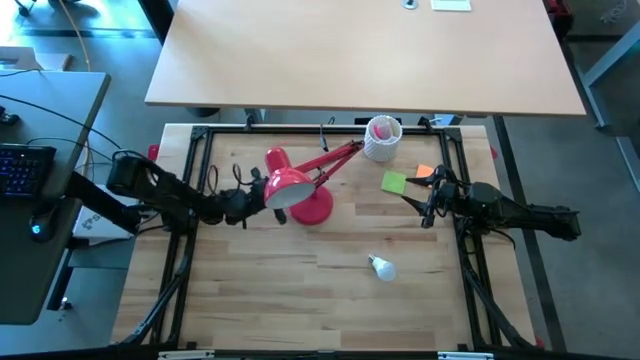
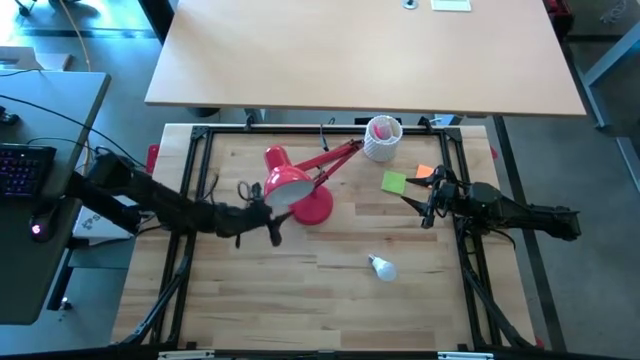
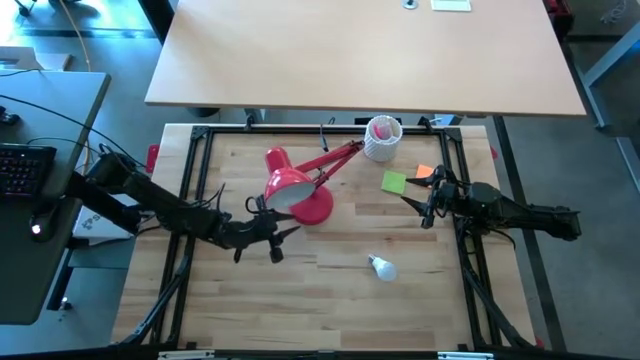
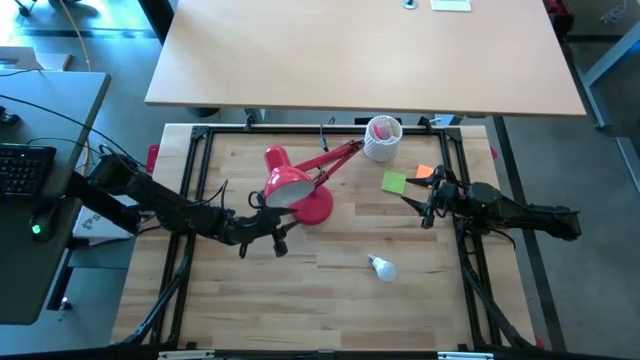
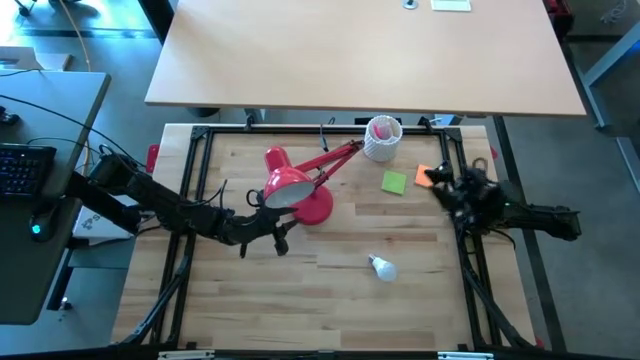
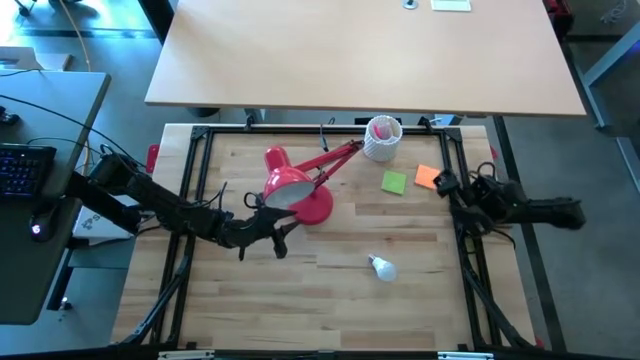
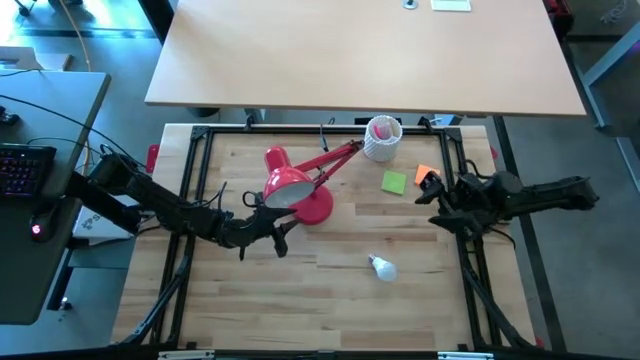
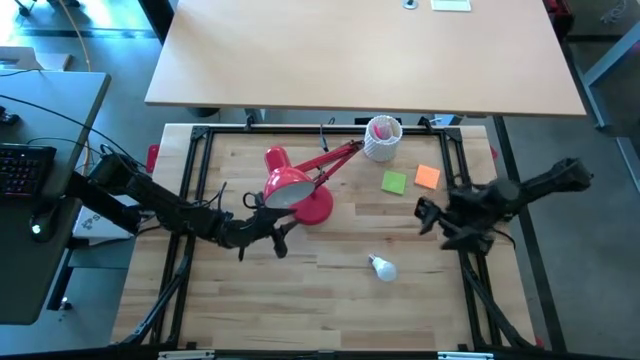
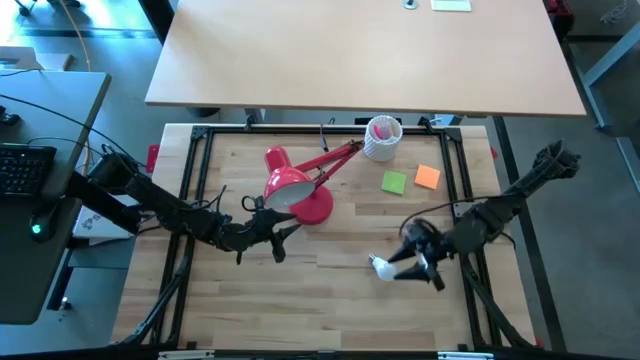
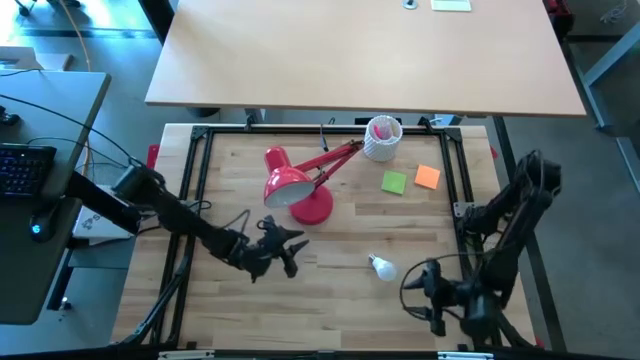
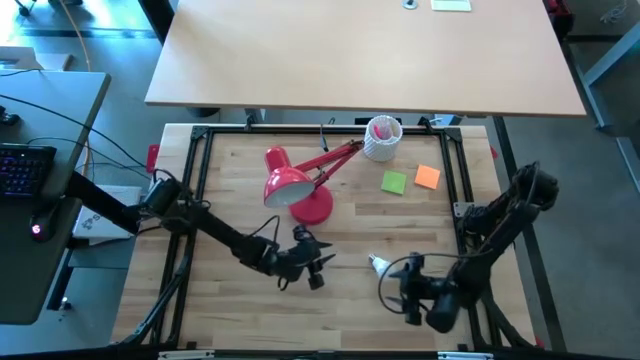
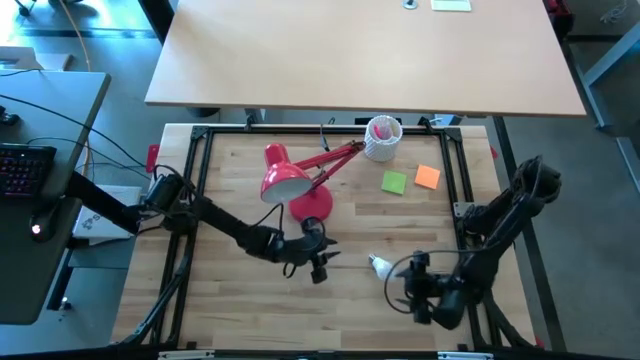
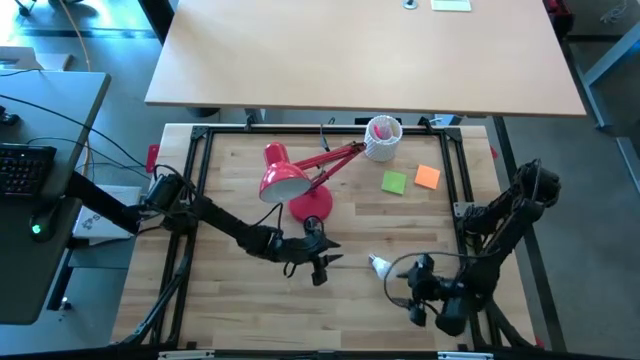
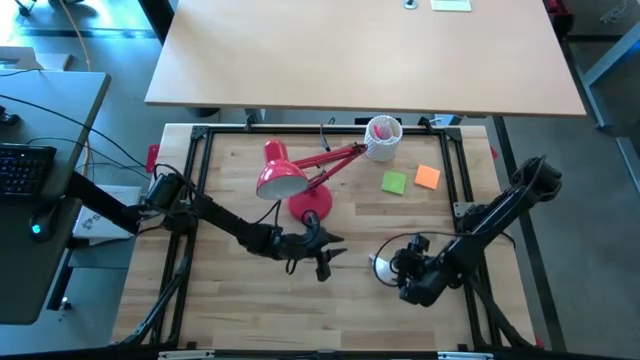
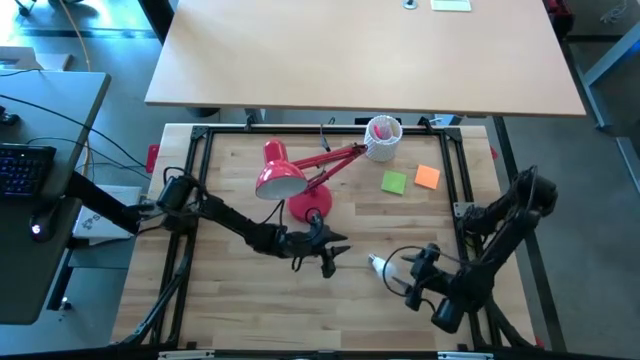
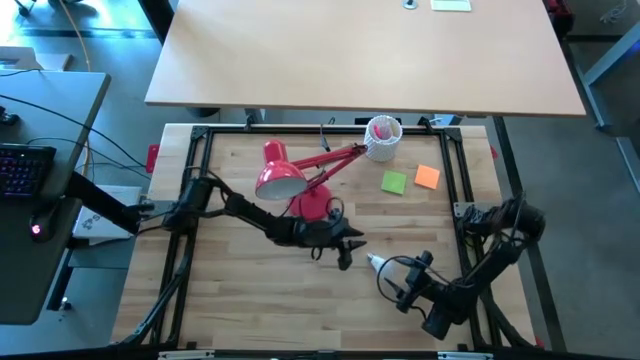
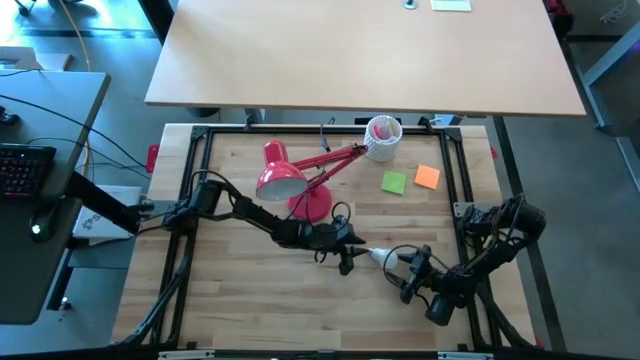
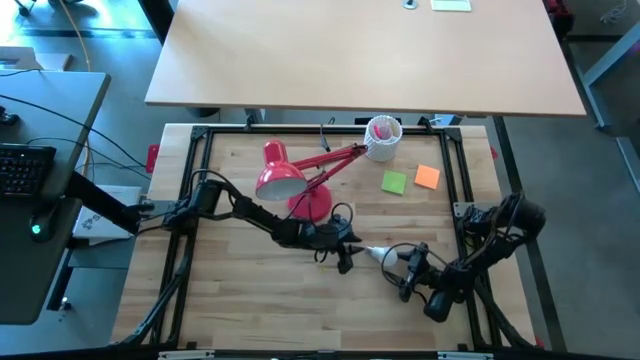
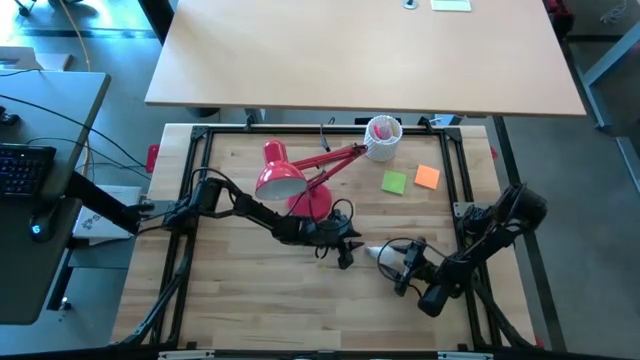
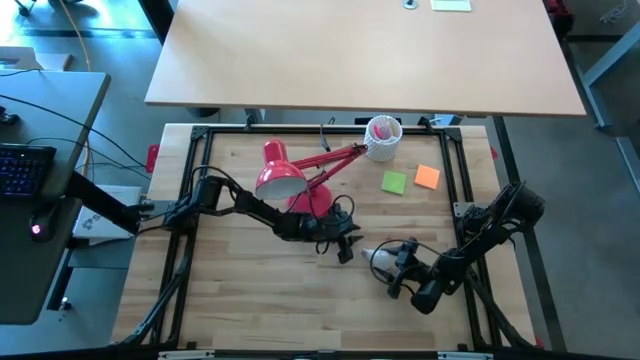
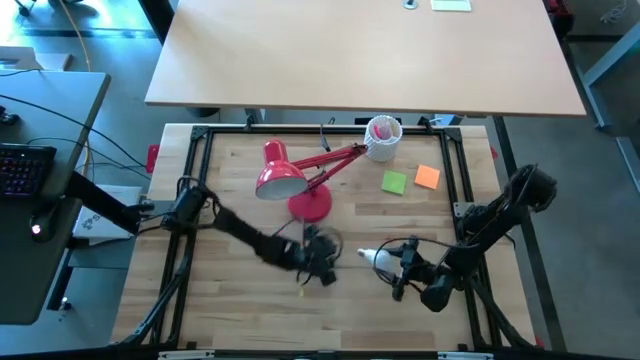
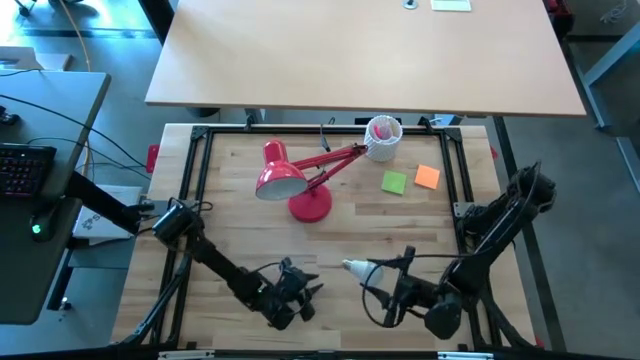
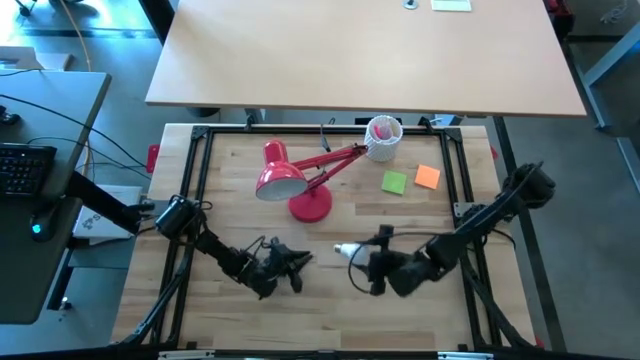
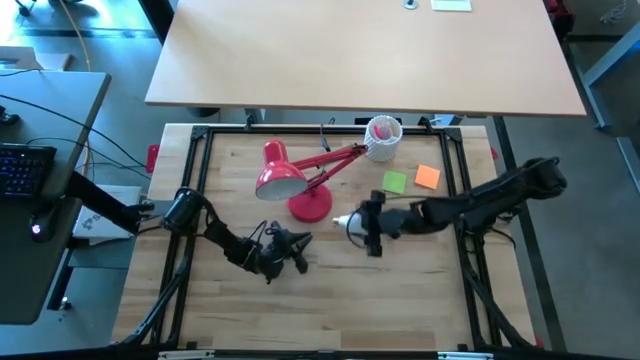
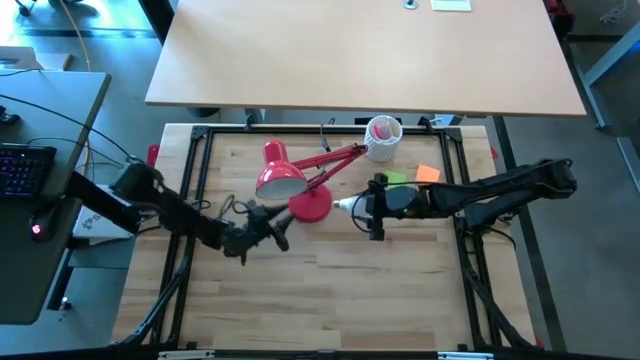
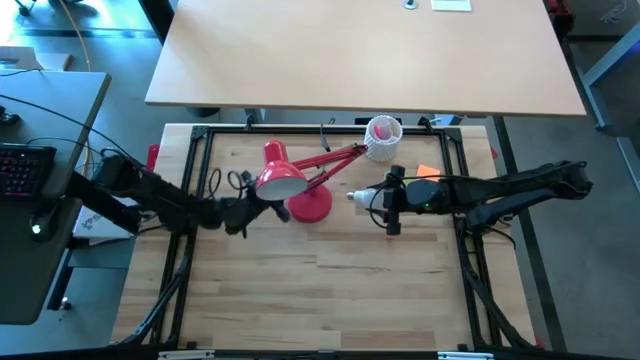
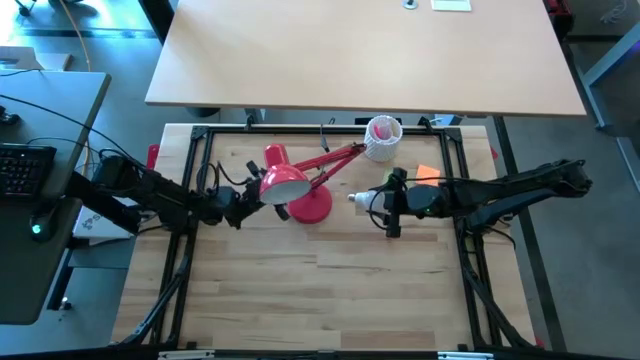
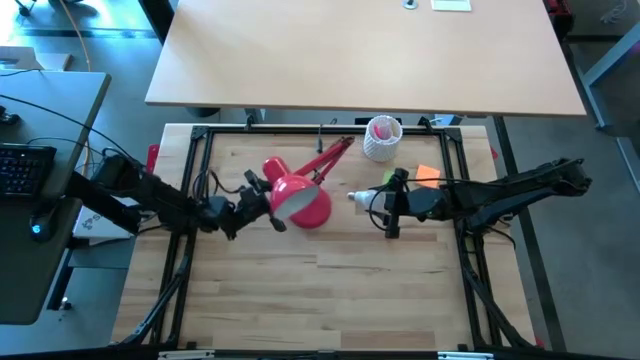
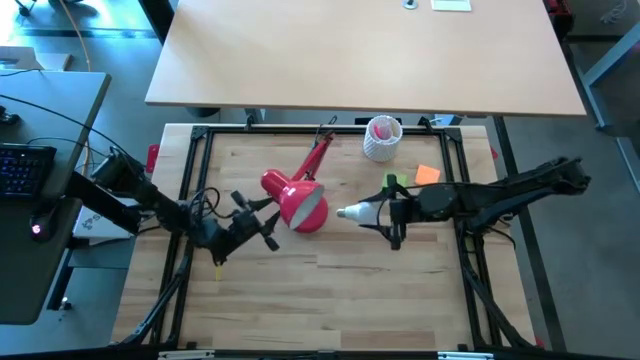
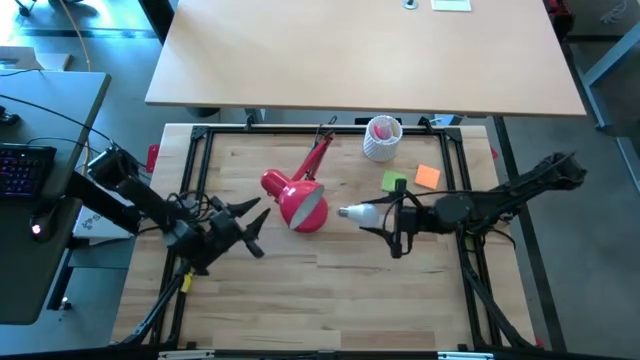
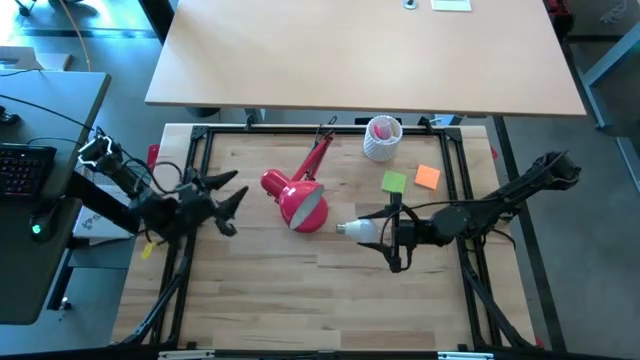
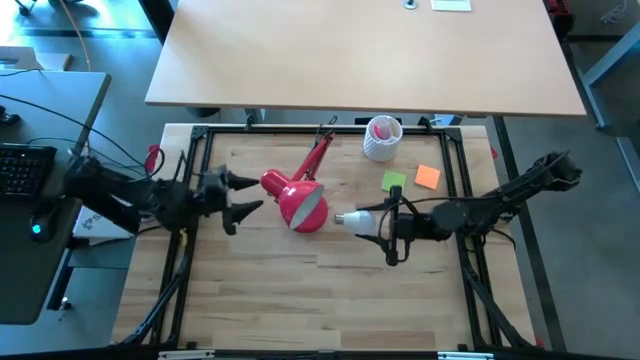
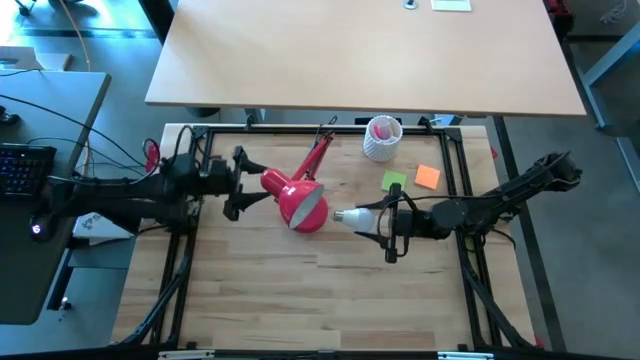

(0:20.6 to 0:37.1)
Task: Screw lightbulb
Insert the white lightbulb into the red lamp

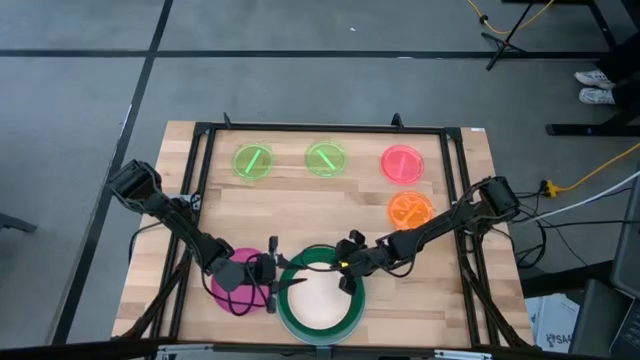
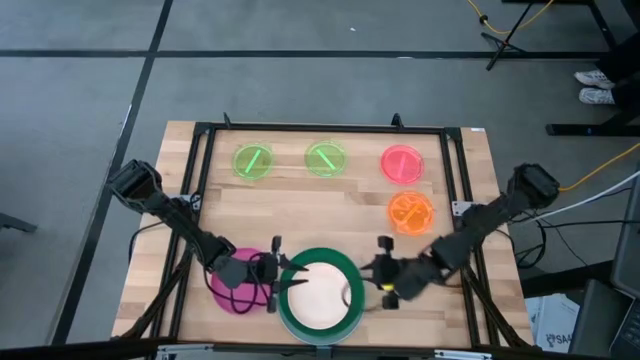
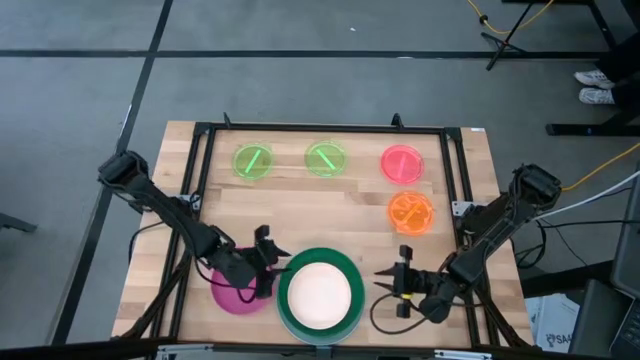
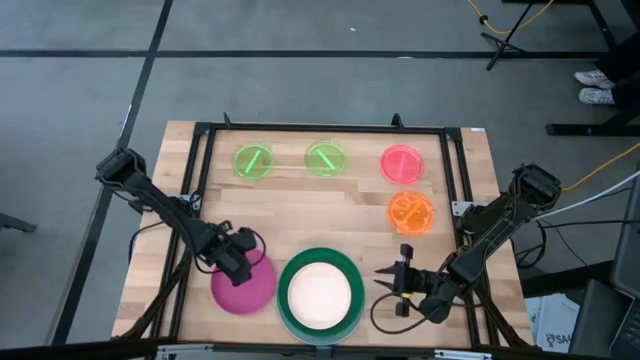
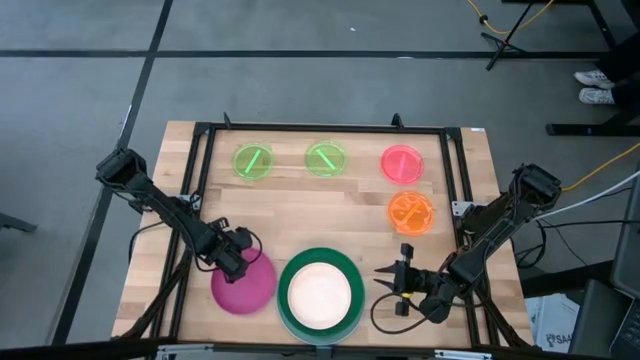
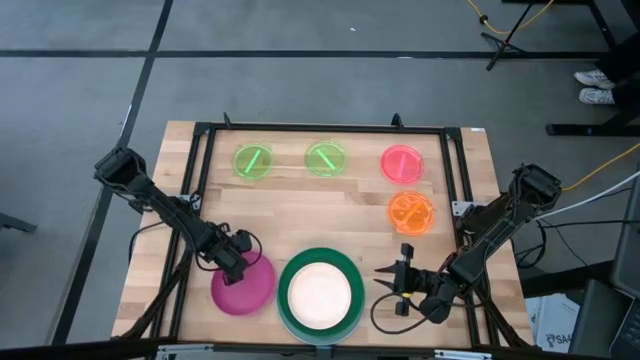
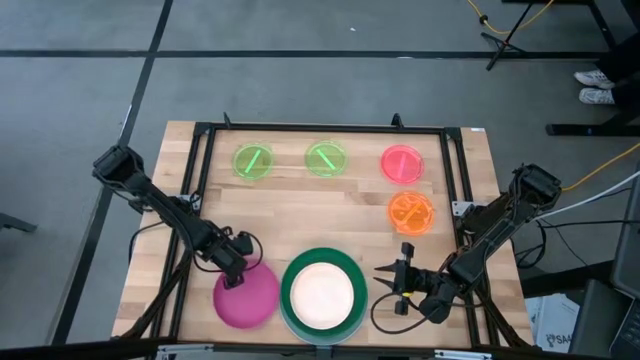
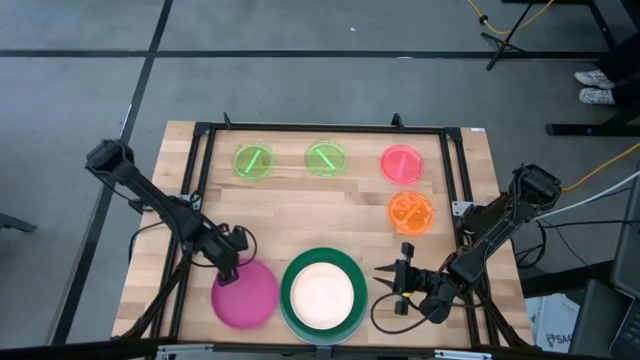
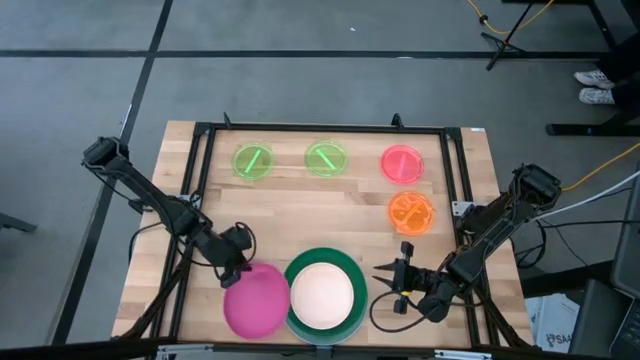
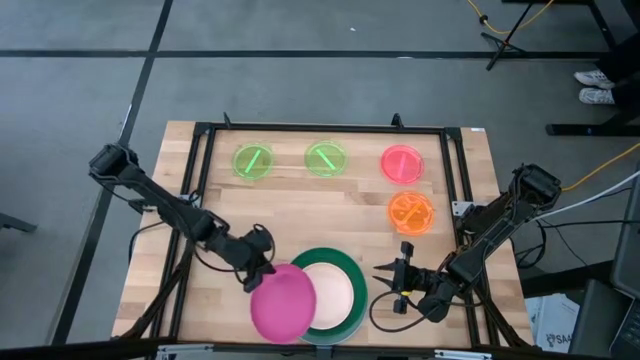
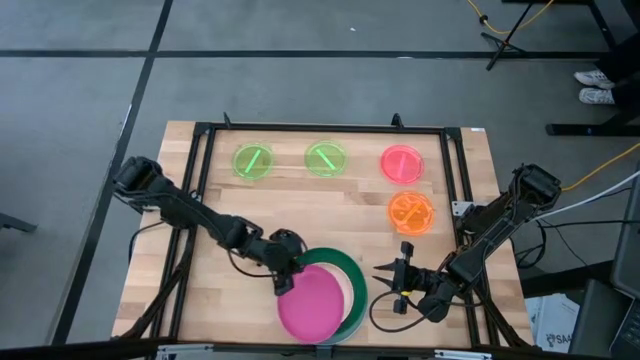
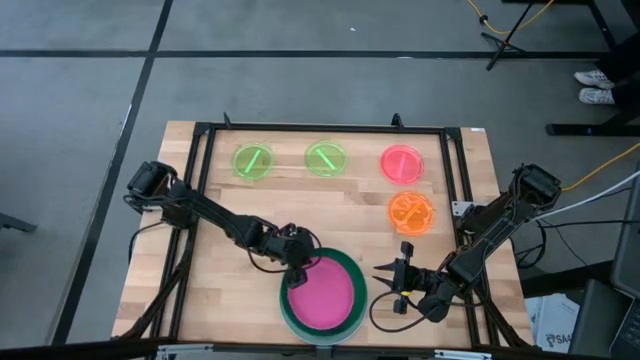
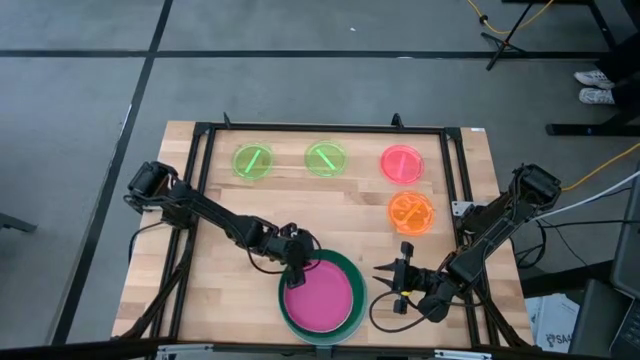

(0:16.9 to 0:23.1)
Task: Stack plastic plates
Stack the pink plate on top of the light orange plate
